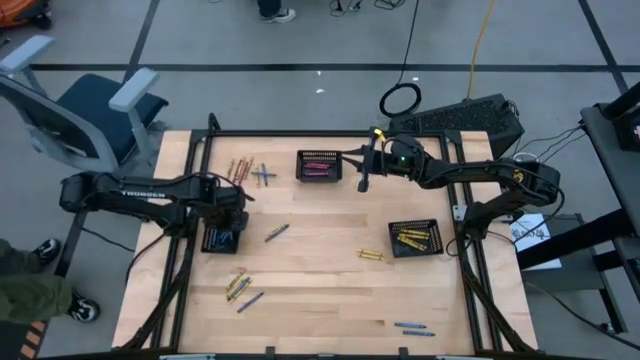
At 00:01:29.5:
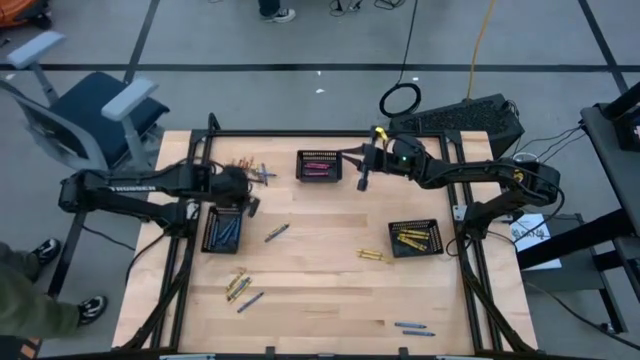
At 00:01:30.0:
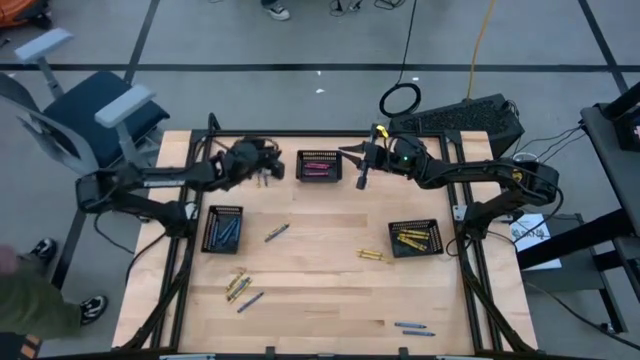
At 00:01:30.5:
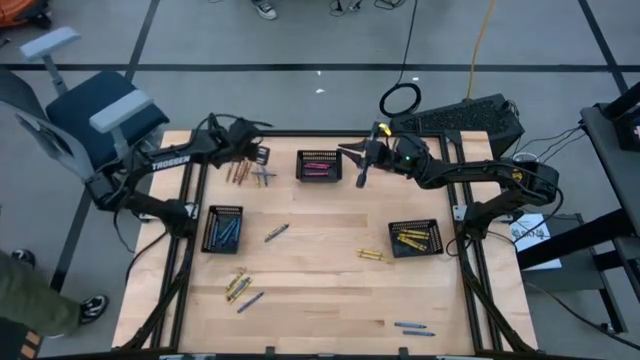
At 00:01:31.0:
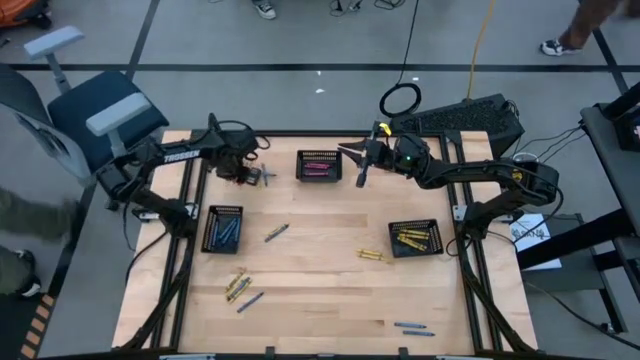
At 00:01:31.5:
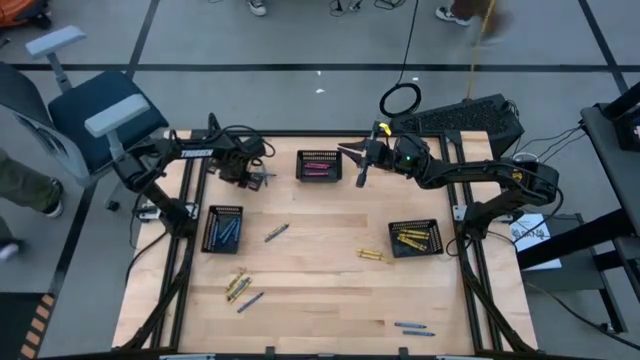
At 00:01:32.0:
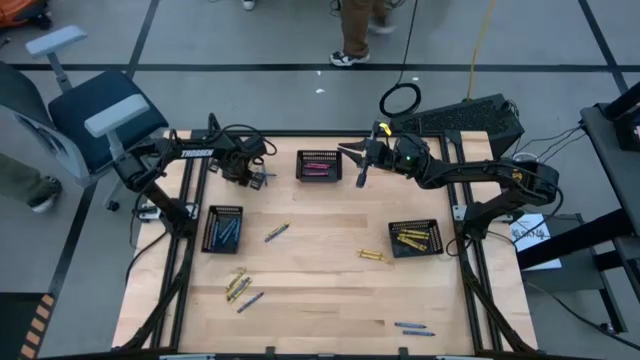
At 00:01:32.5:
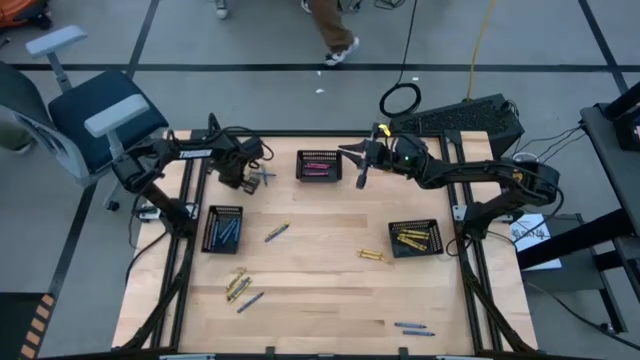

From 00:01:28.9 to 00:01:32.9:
Task: Sort crayons
Put the red crayon into the top black bin

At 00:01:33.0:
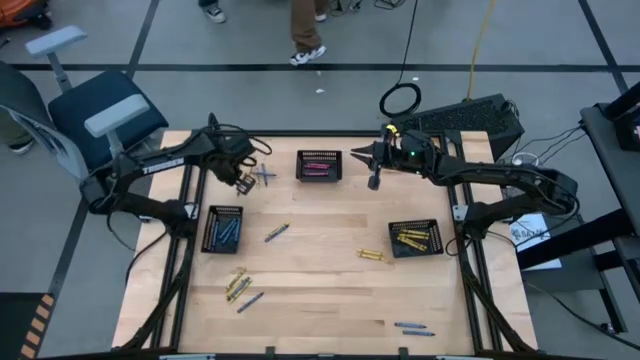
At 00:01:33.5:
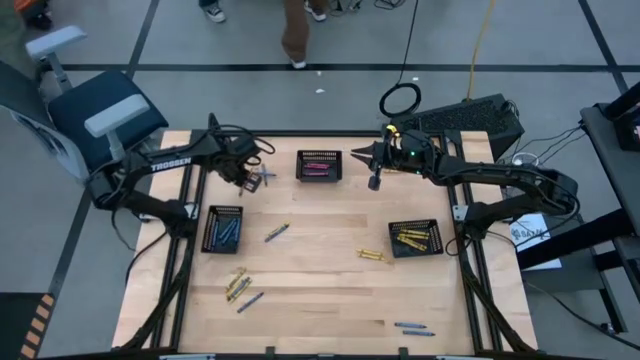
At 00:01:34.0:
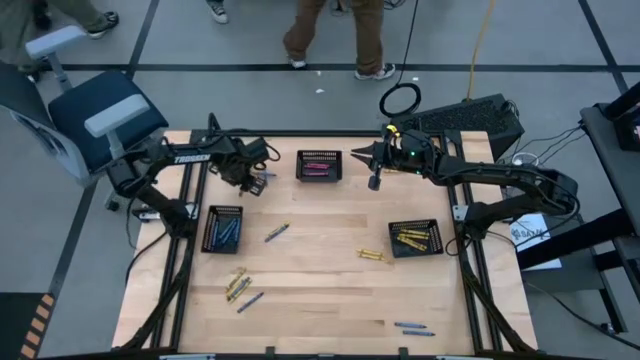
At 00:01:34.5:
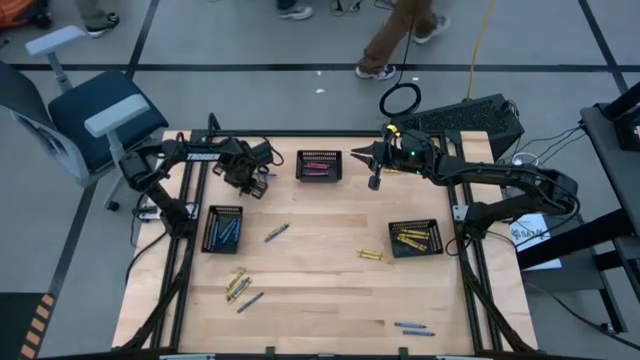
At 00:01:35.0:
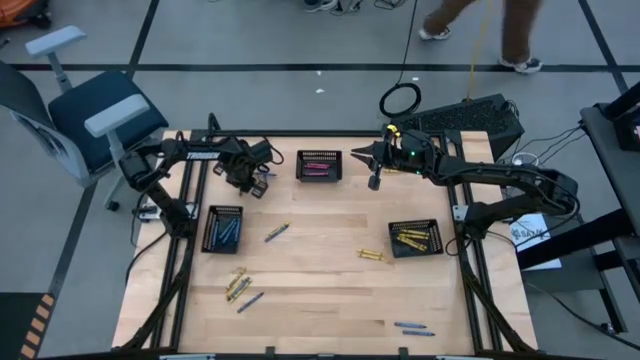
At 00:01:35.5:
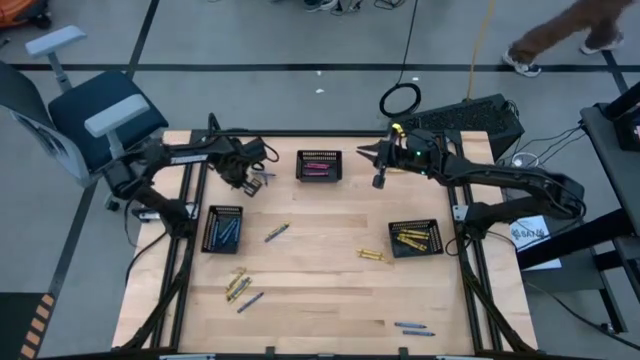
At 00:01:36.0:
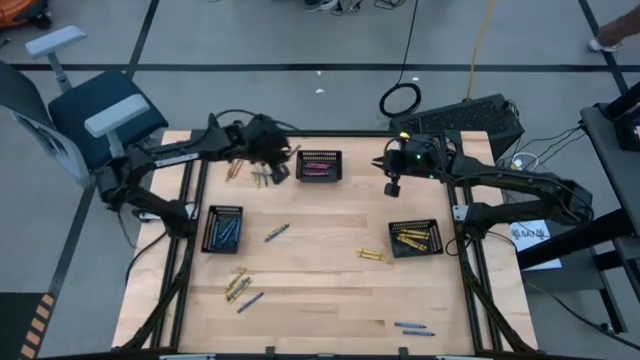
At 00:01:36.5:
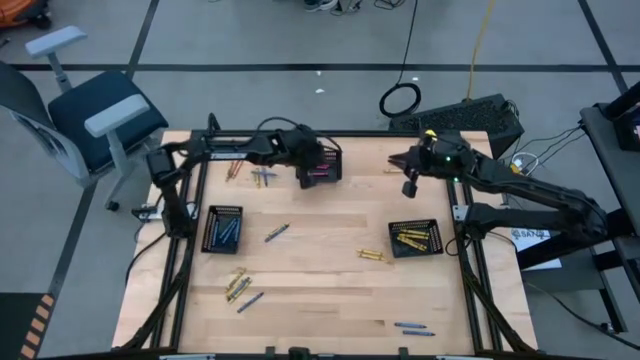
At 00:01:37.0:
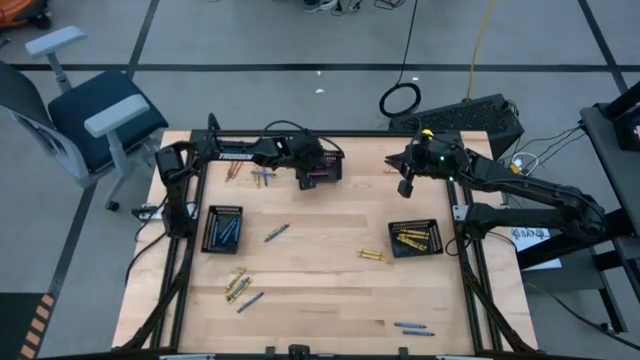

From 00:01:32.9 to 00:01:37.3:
Put the red crayon into the top black bin

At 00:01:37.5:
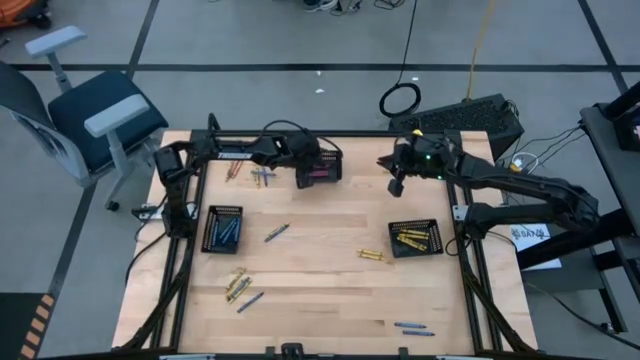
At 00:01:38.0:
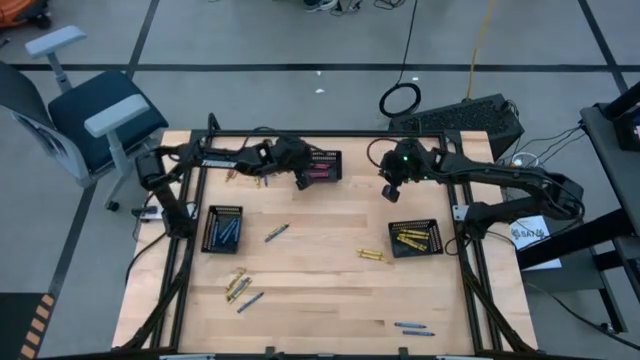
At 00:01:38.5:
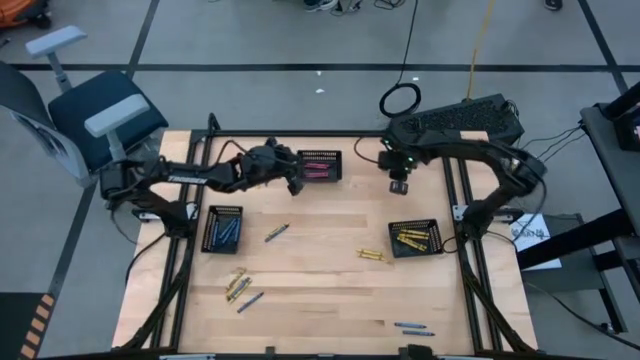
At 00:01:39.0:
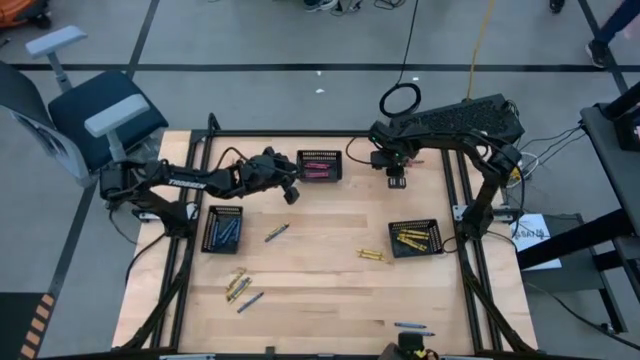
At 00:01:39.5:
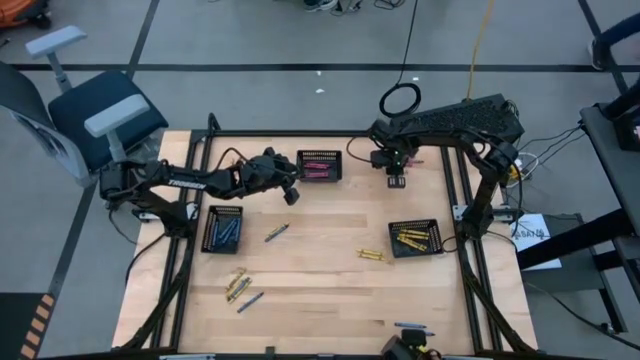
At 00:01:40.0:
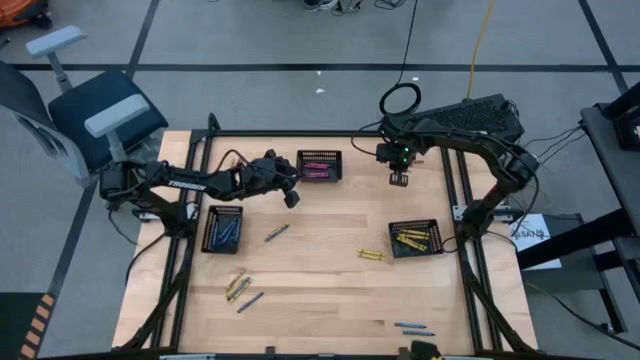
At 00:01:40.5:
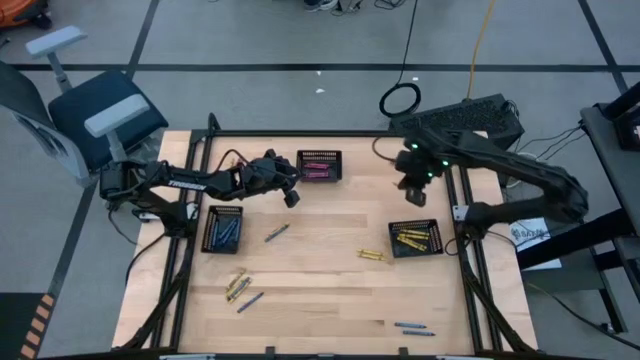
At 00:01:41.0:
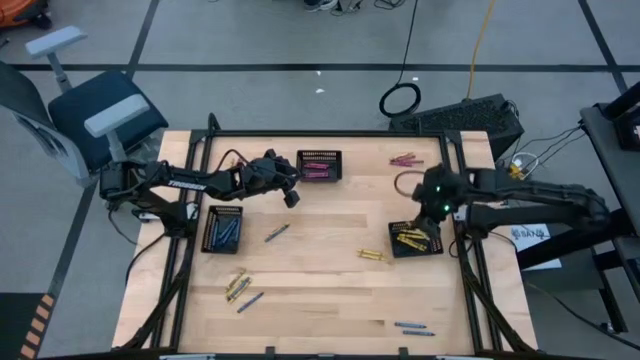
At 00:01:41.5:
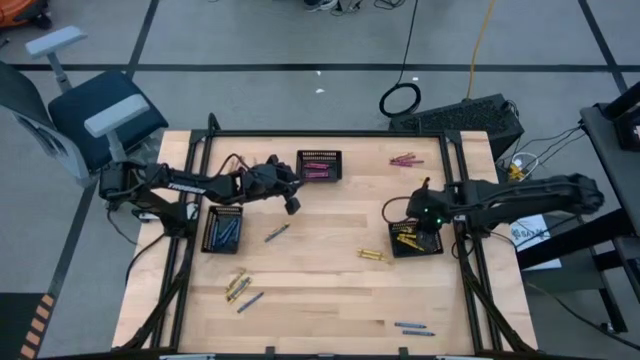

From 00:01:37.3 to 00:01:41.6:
Put the yellow crayon into the bottom right black bin

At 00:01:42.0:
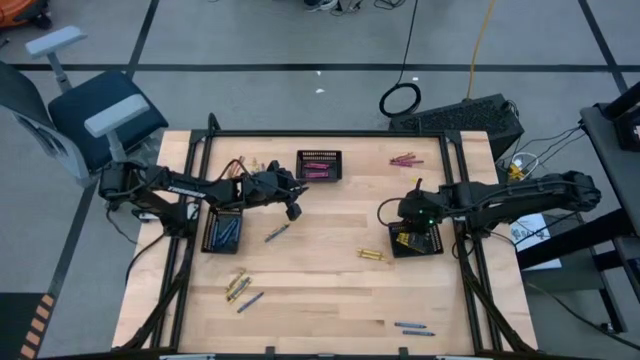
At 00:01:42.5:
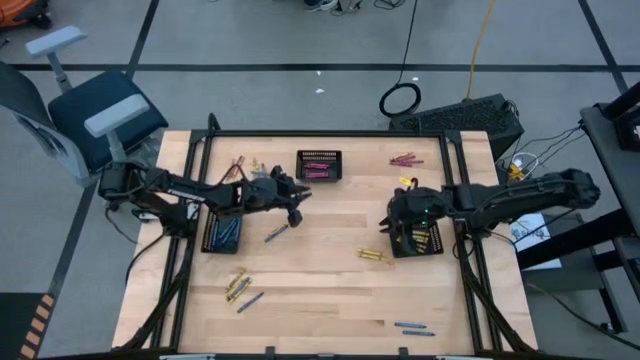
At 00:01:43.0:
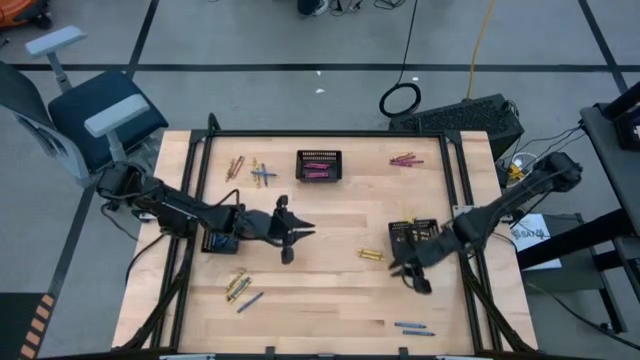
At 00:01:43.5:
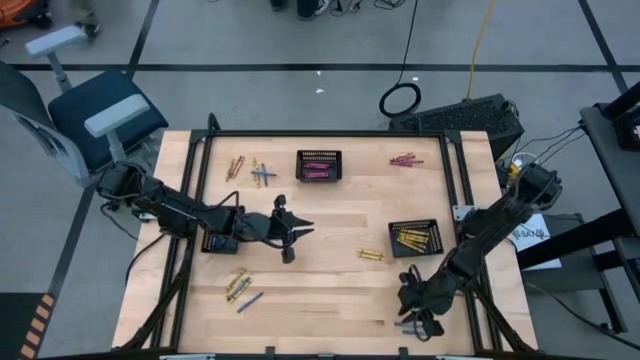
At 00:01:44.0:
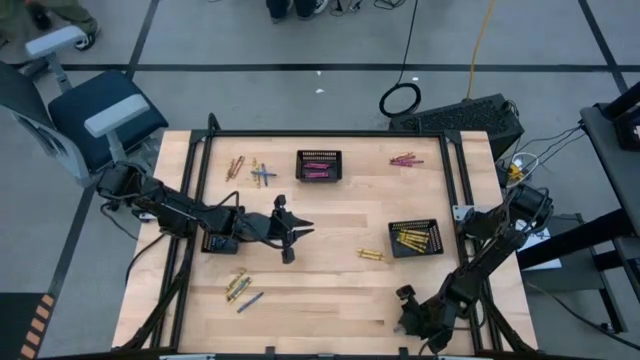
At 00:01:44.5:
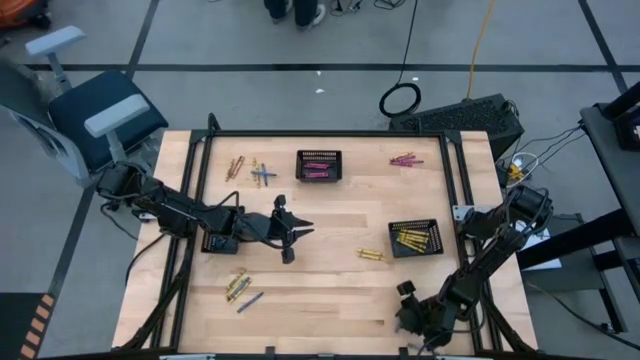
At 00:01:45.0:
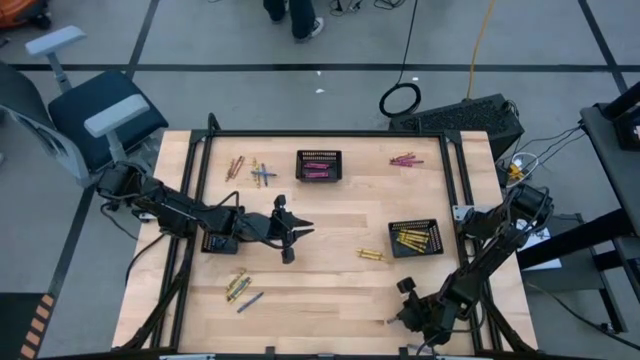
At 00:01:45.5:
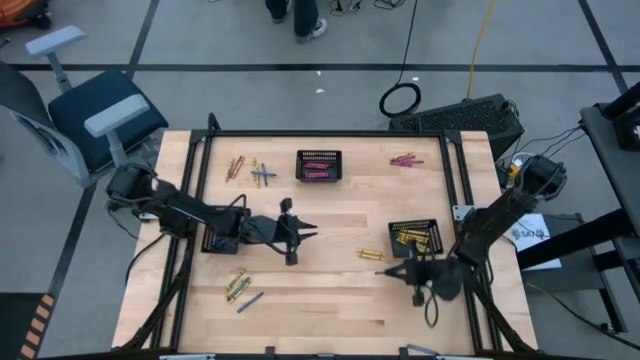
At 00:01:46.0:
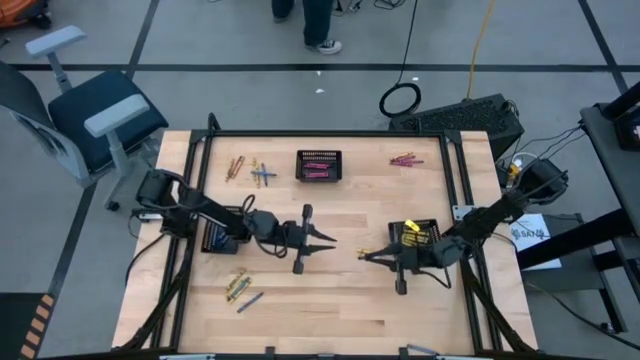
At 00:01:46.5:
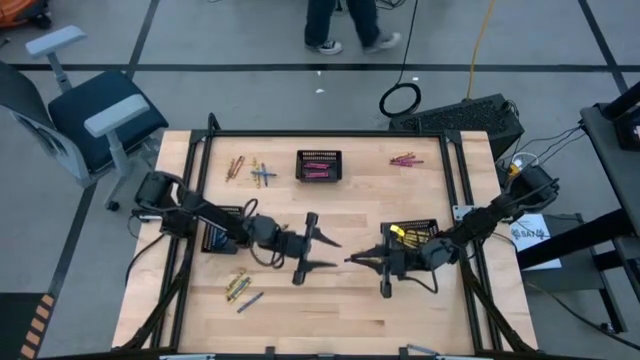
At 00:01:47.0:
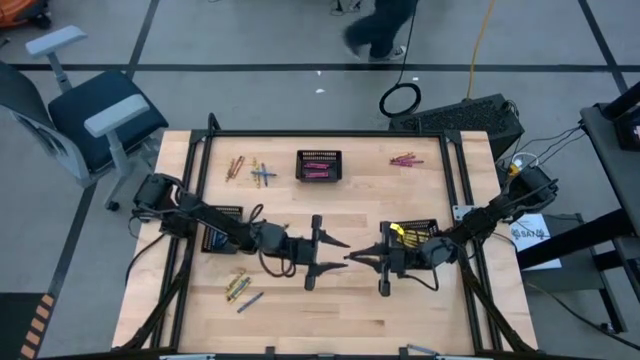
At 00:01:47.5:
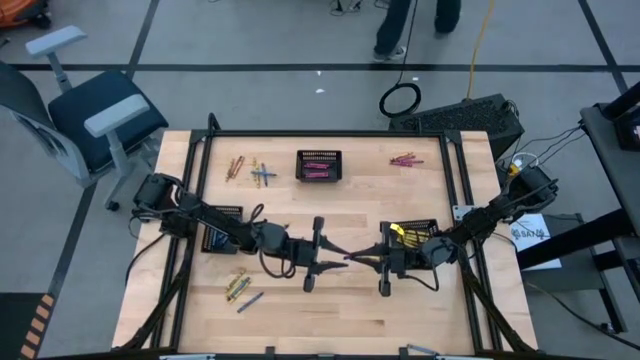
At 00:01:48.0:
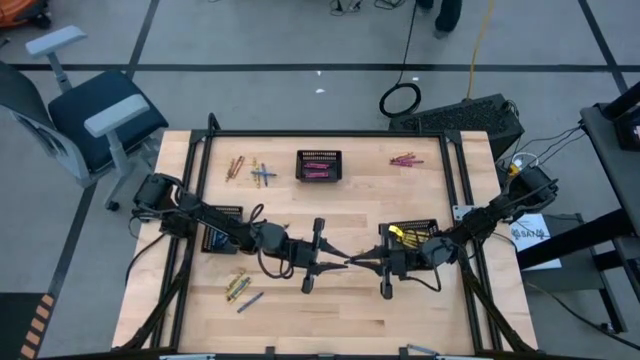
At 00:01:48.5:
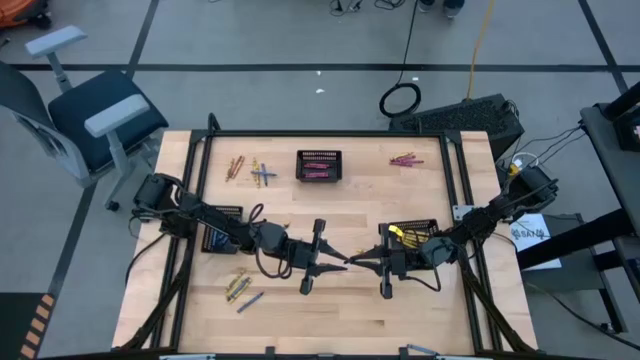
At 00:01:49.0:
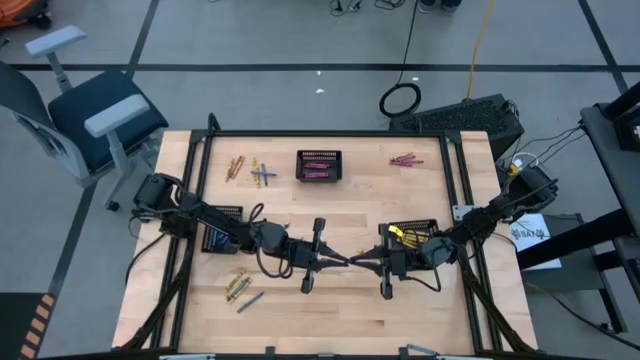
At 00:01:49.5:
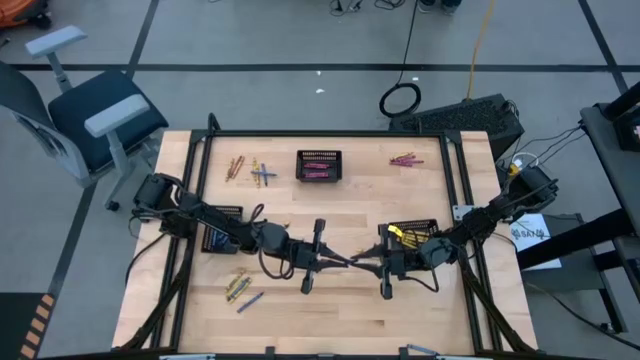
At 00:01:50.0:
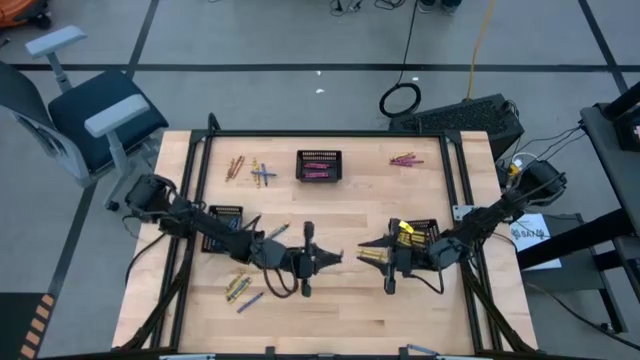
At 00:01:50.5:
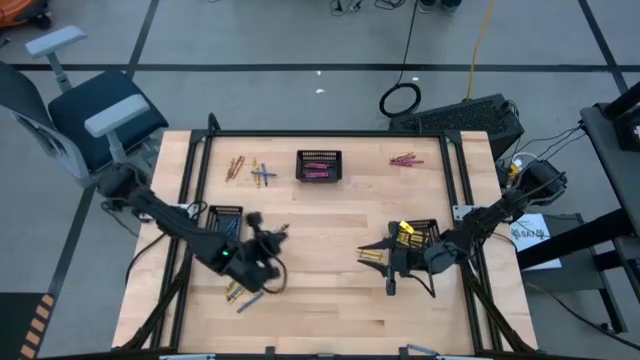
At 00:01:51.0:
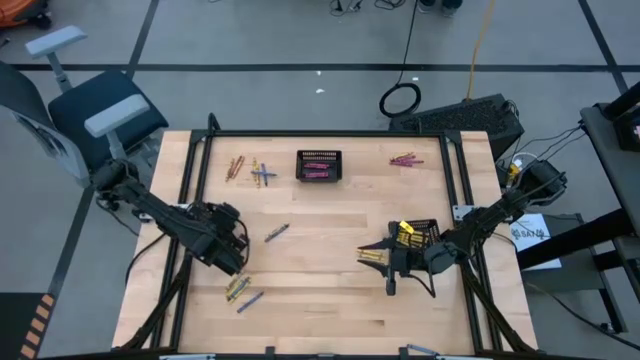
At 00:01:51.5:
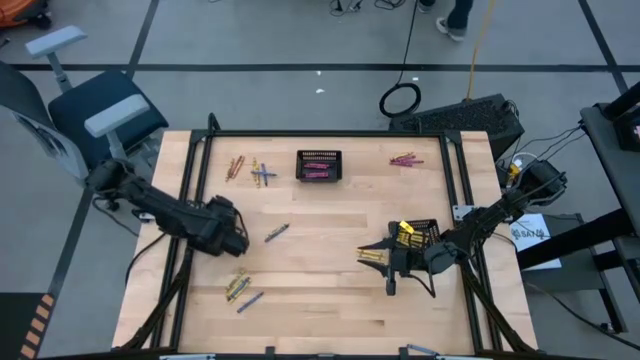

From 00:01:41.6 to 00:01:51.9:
Put the blue crayon into the bottom left black bin
